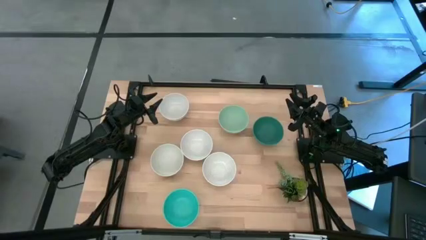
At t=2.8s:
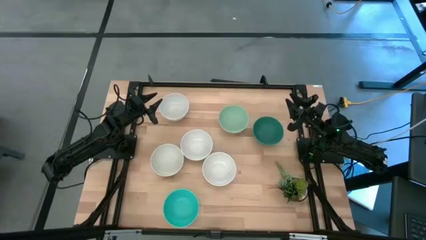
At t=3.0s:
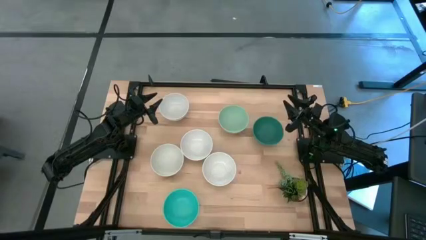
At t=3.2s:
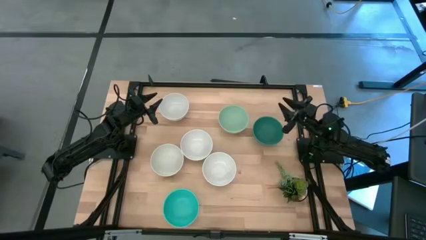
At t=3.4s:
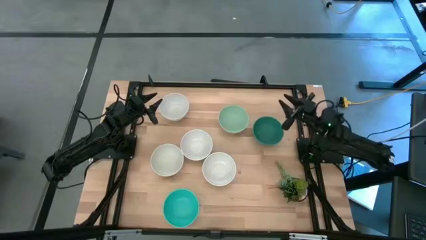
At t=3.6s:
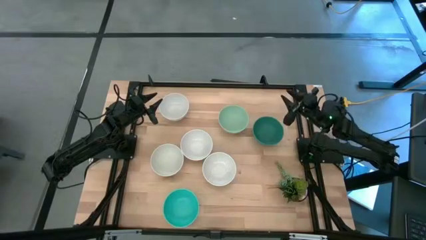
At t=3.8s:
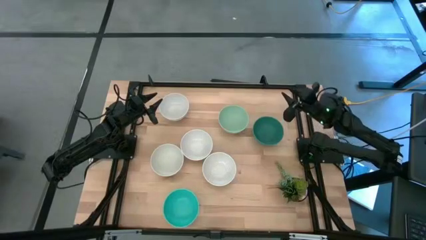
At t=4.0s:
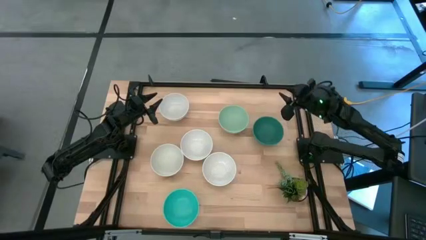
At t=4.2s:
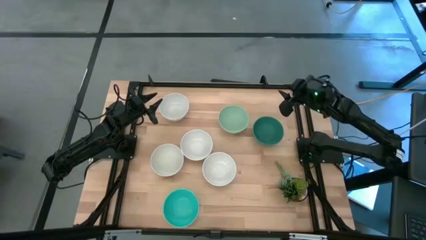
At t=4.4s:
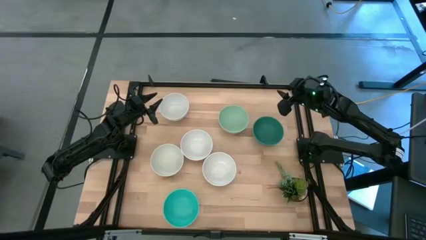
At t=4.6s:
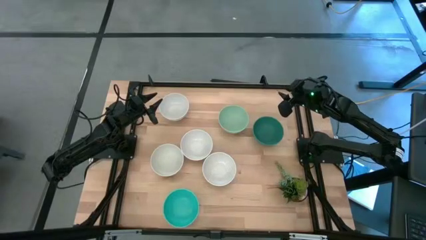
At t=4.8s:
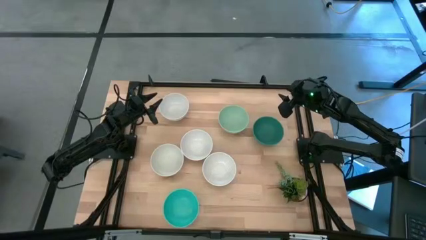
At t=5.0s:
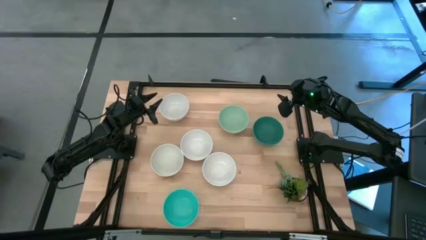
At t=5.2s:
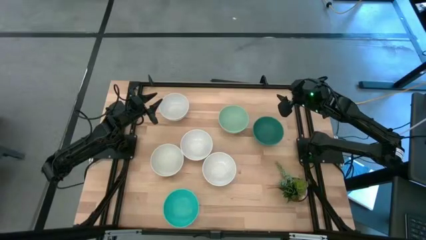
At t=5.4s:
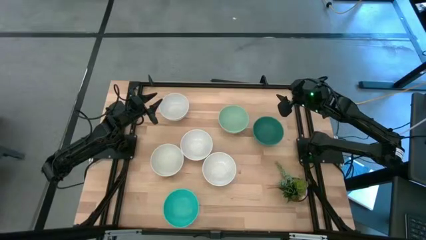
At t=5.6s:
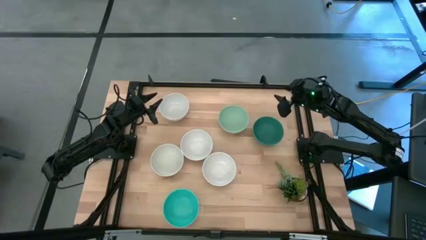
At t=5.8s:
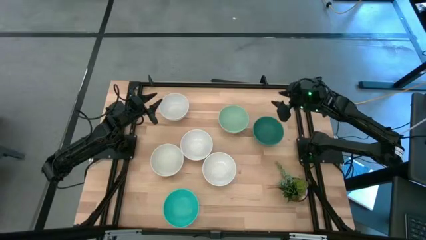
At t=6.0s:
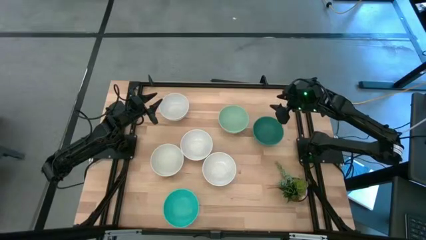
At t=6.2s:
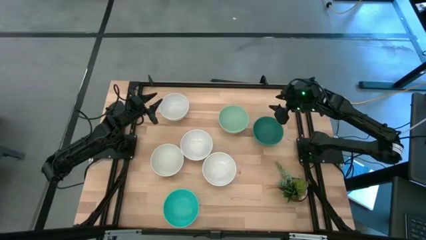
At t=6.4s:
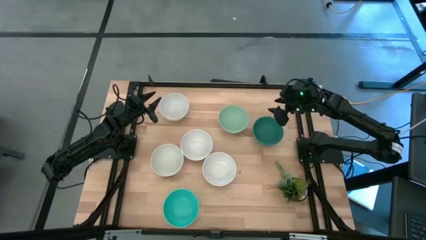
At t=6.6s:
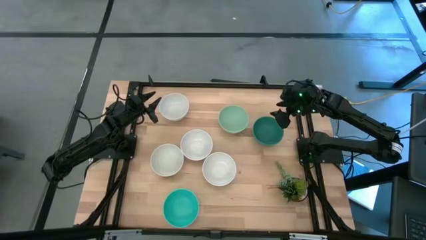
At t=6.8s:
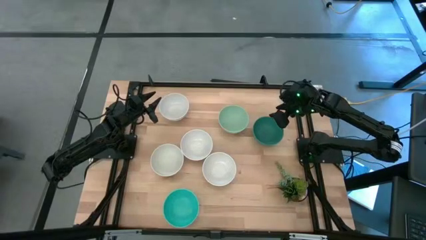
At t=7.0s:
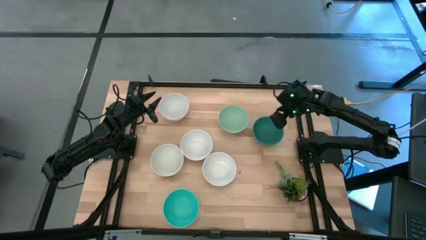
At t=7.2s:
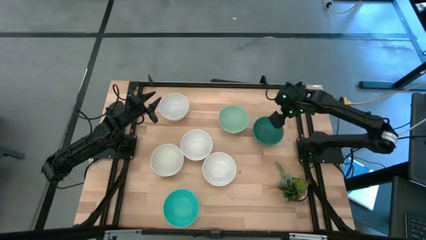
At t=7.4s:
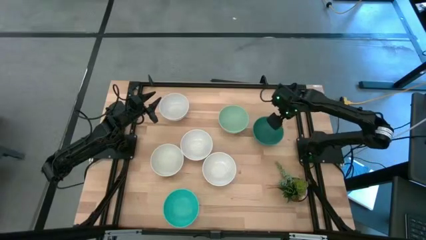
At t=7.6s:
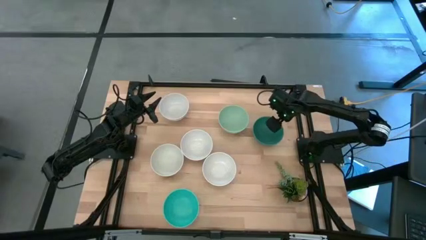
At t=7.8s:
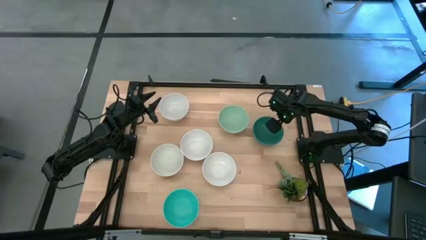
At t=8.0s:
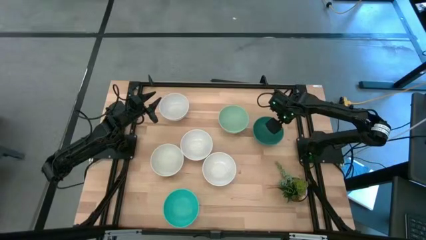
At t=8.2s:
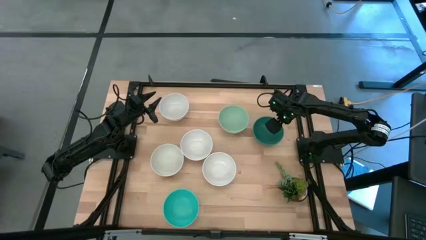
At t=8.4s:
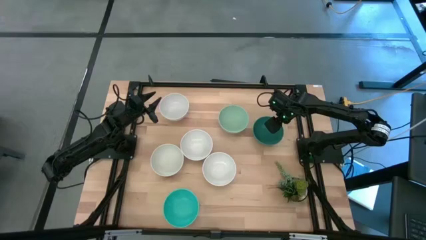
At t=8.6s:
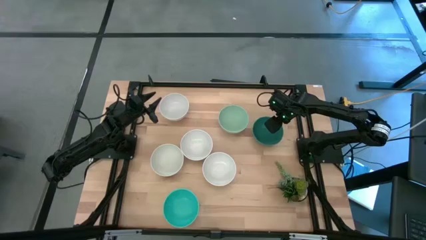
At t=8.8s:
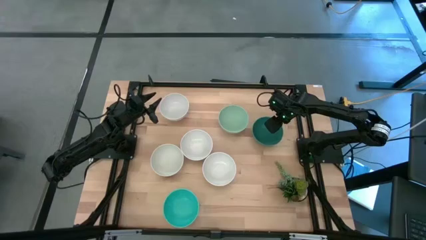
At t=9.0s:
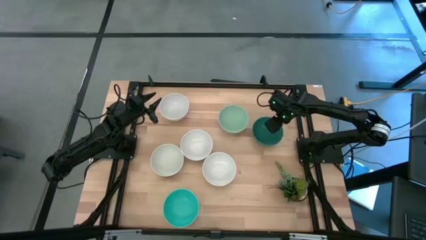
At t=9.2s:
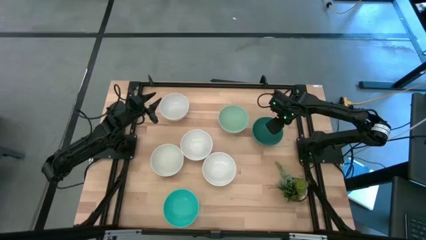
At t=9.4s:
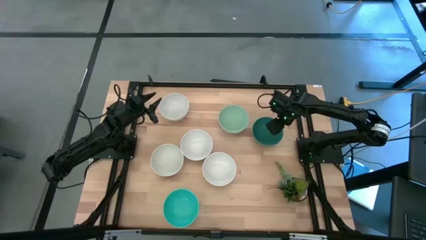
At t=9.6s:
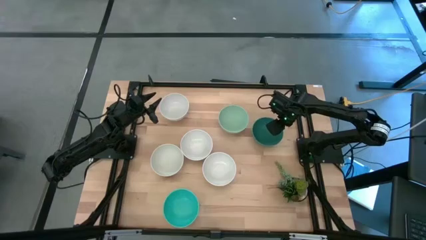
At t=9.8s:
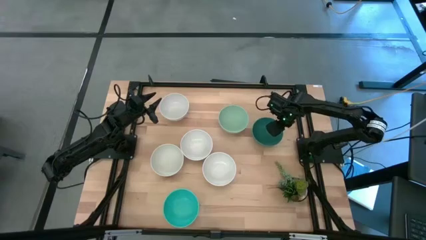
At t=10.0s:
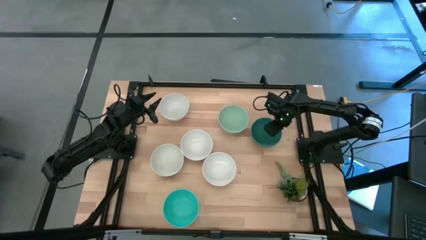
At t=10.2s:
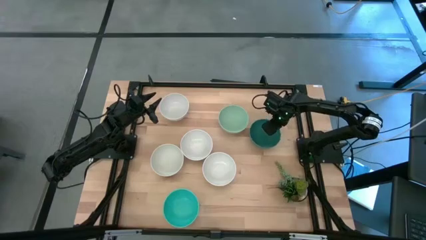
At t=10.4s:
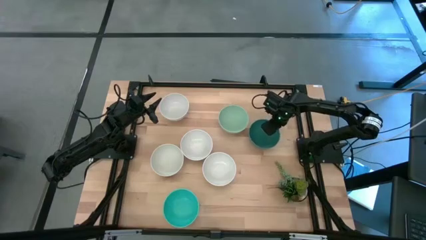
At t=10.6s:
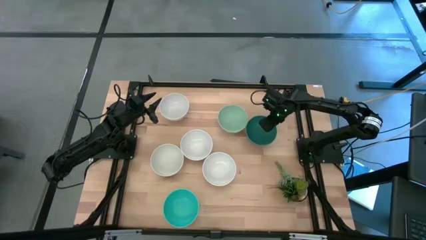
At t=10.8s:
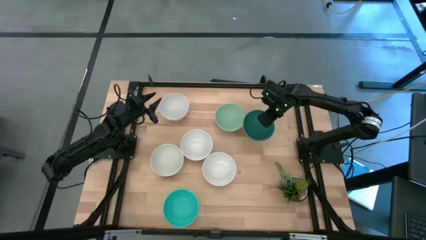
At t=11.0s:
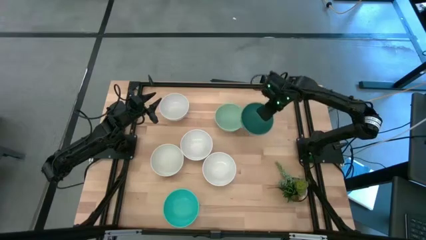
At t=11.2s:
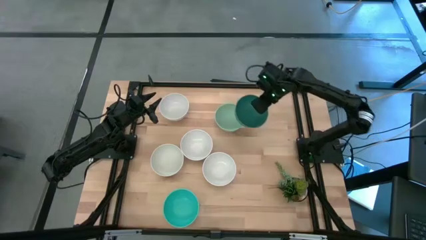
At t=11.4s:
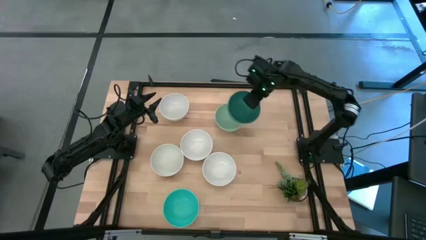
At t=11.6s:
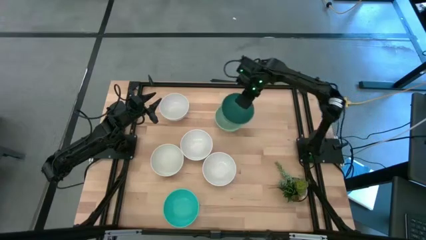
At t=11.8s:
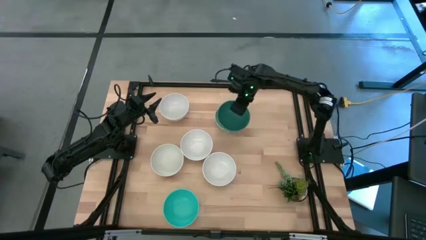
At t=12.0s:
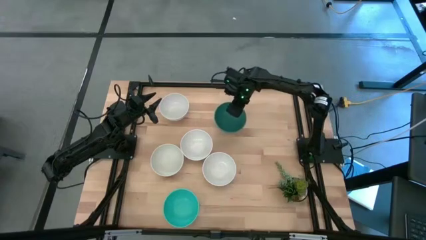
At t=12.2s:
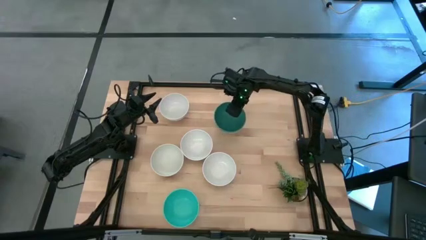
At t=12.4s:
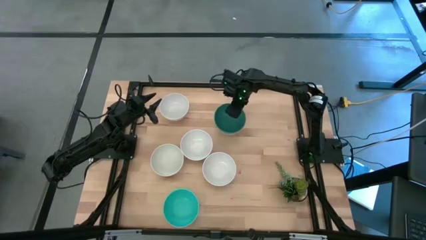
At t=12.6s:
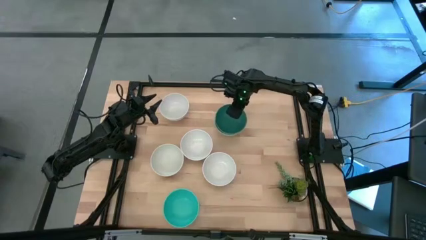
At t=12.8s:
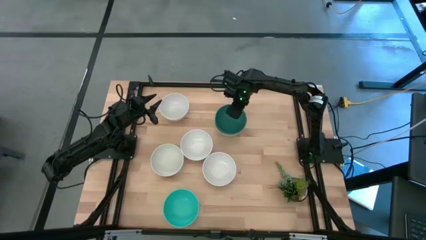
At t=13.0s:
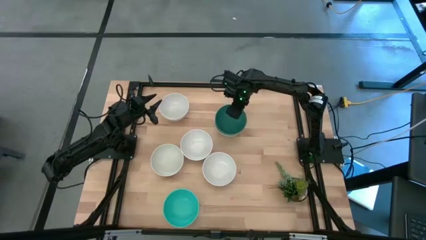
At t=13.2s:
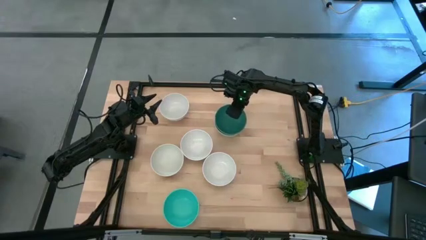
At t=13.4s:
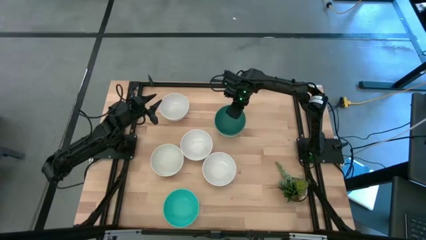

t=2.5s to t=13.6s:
Task: Nest bowls inside each other
Stack the dark green bowl on the light green bowl

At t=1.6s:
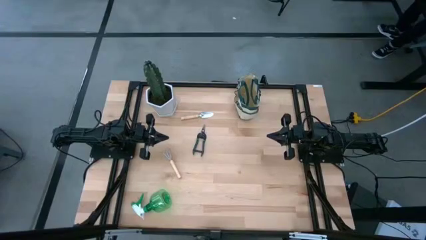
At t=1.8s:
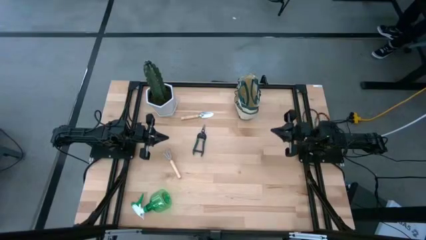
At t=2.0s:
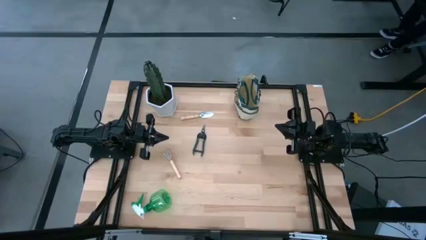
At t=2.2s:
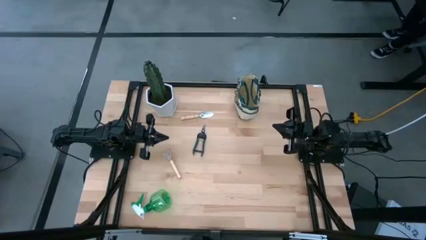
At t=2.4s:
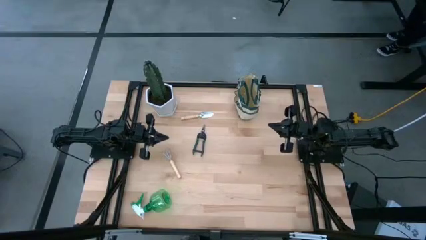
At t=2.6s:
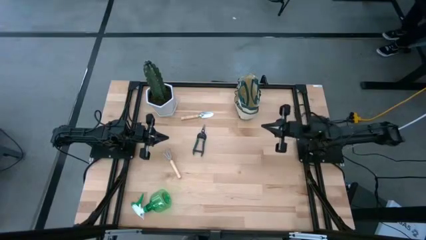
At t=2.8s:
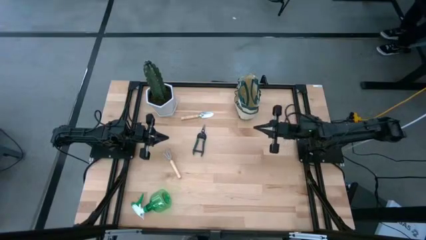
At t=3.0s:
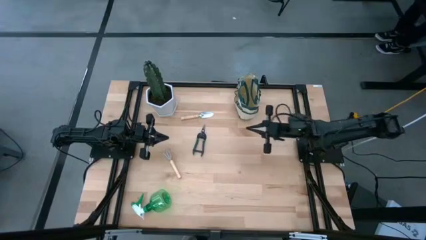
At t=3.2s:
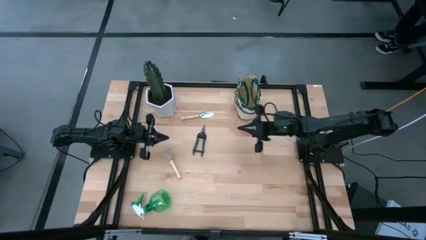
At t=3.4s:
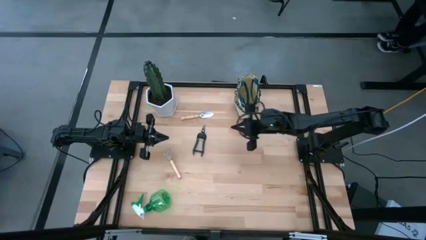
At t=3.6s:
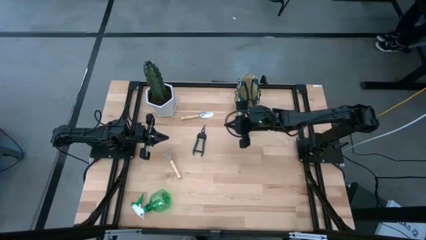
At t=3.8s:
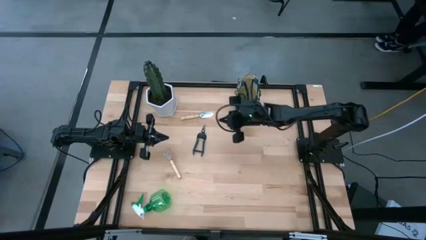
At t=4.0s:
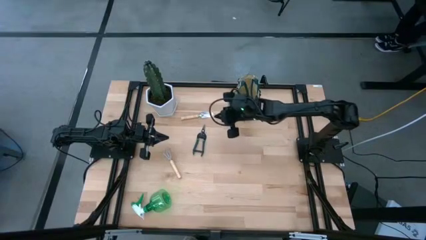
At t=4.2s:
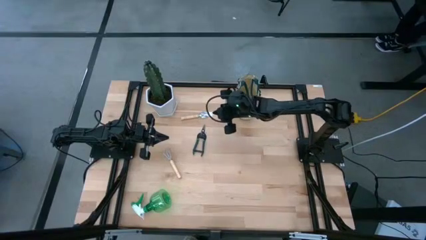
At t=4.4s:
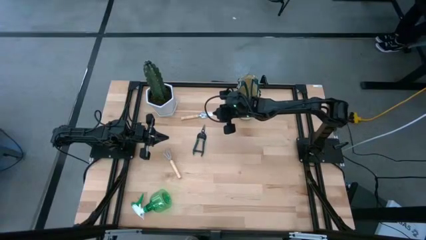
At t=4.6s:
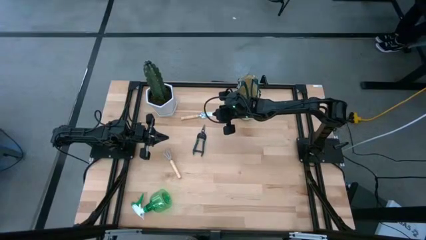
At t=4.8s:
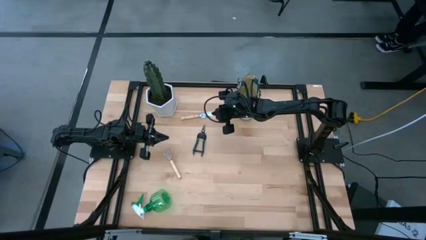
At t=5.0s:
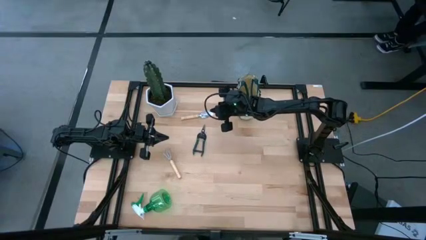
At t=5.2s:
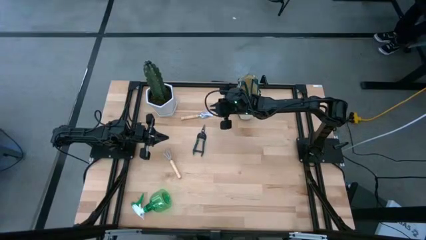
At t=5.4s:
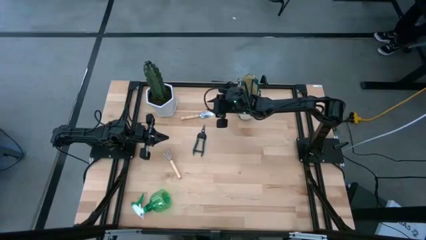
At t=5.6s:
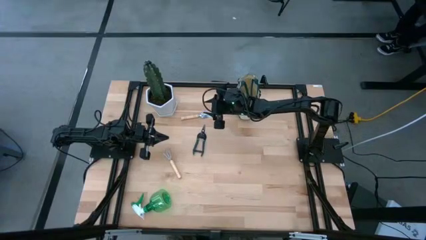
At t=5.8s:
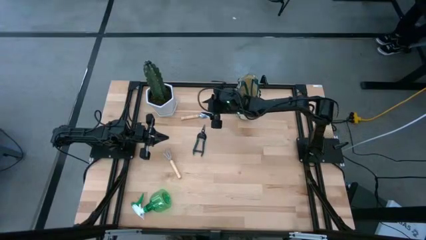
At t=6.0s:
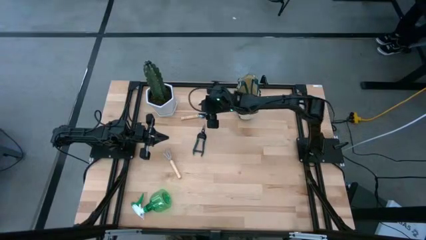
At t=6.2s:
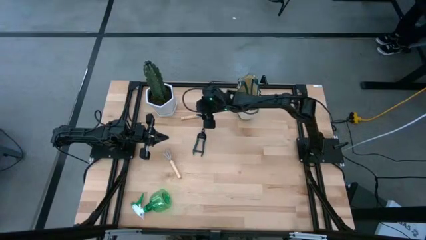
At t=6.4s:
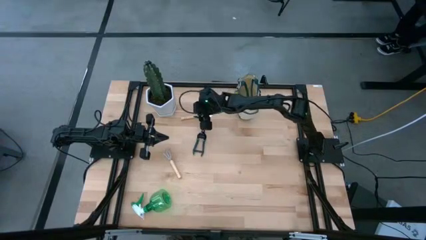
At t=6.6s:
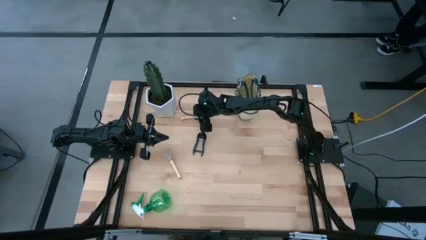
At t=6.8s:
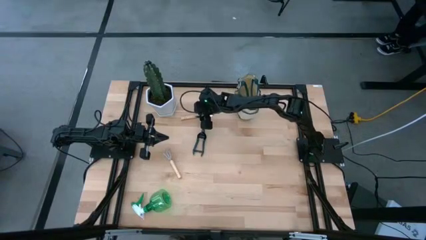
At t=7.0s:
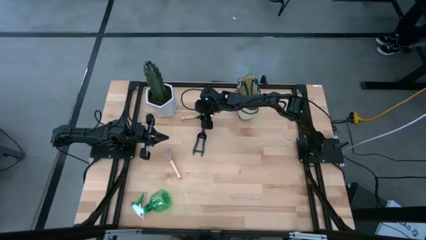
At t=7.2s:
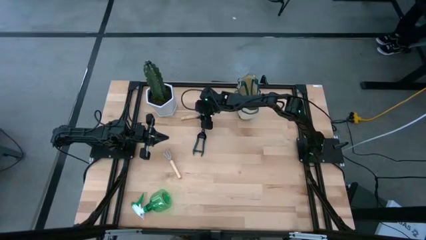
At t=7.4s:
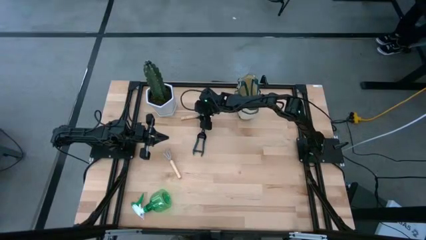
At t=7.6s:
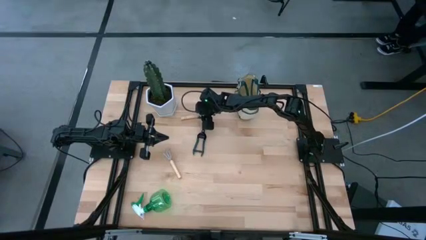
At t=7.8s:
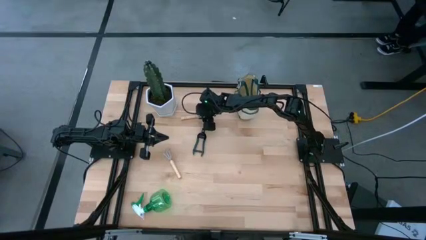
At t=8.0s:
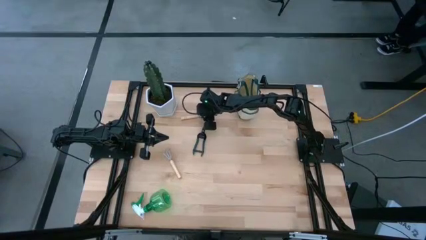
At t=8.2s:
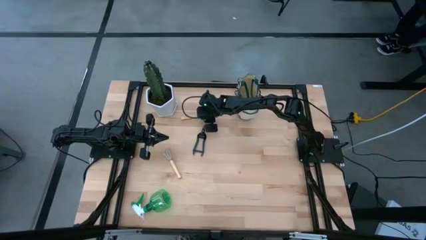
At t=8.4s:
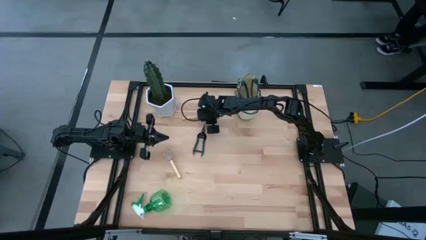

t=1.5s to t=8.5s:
Task: Pick & Place Garden tools in Gardening bag
Put the trowel into the gardening bag
